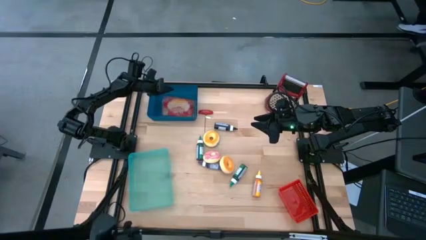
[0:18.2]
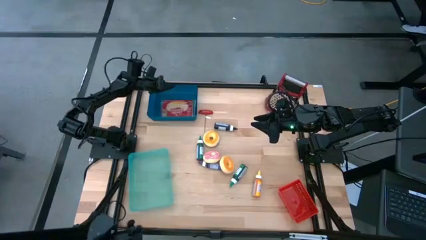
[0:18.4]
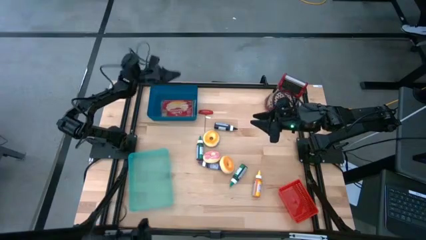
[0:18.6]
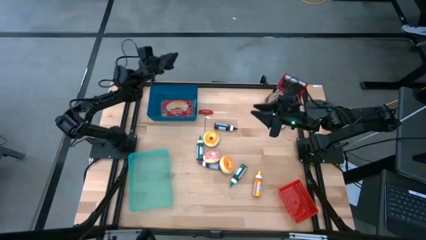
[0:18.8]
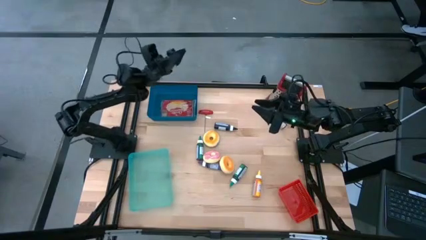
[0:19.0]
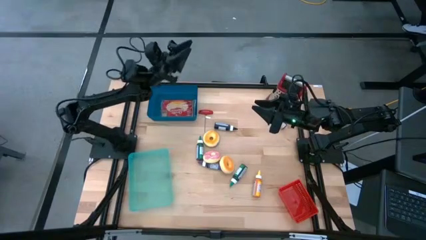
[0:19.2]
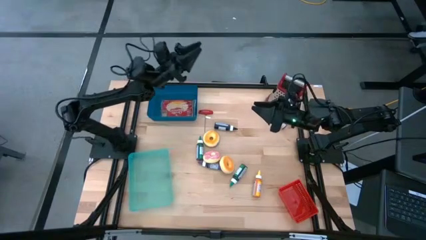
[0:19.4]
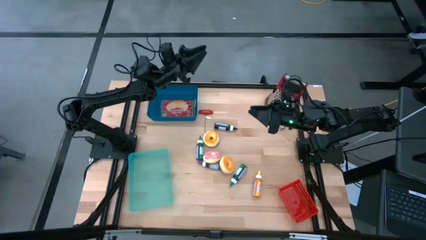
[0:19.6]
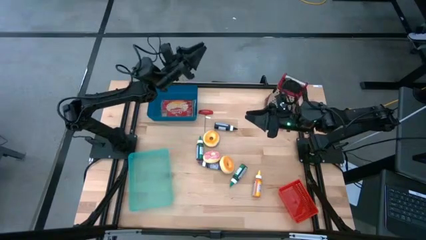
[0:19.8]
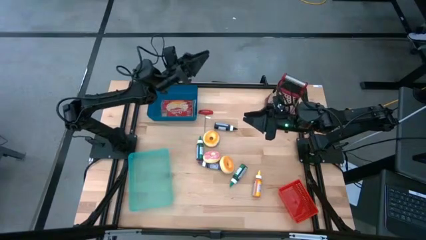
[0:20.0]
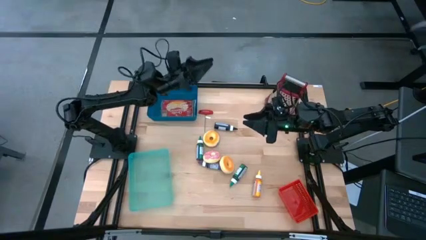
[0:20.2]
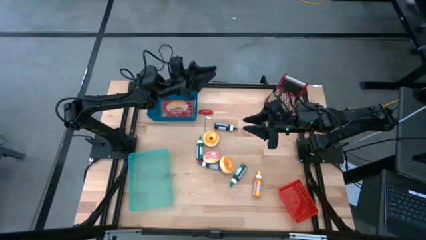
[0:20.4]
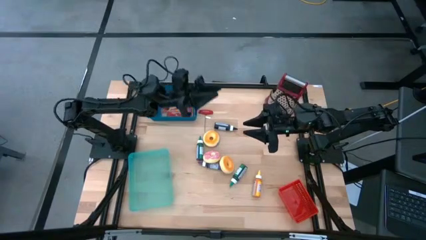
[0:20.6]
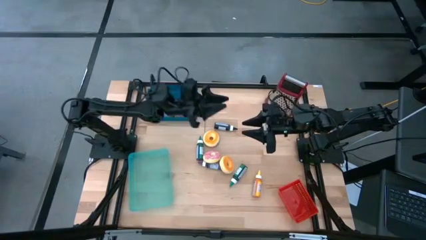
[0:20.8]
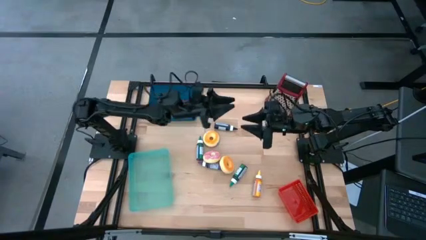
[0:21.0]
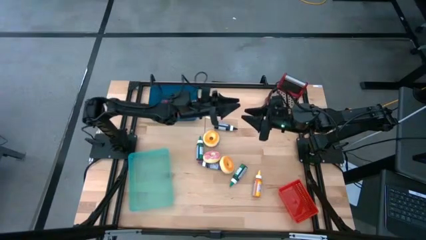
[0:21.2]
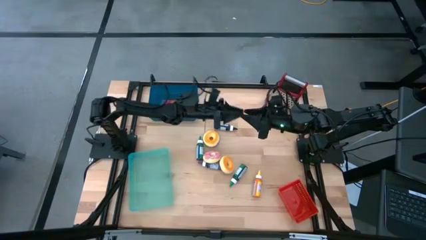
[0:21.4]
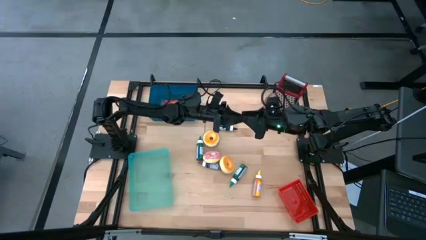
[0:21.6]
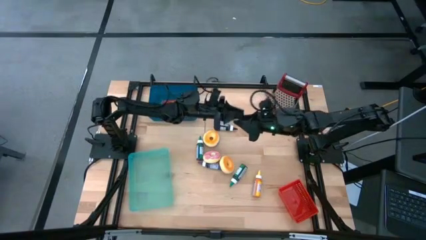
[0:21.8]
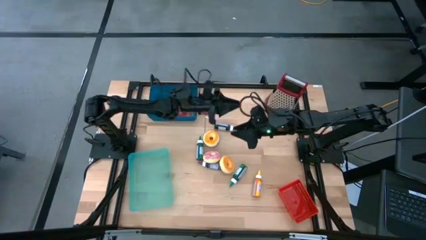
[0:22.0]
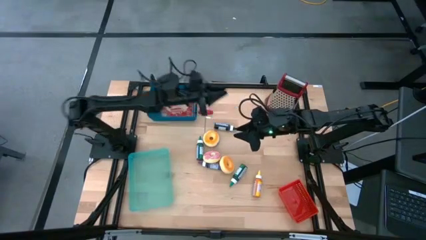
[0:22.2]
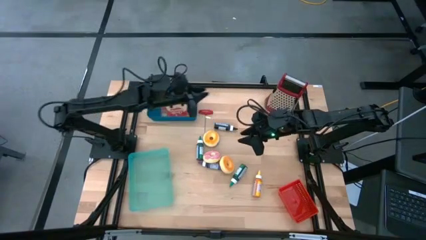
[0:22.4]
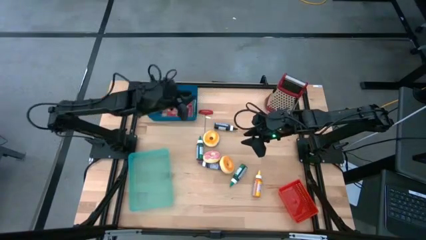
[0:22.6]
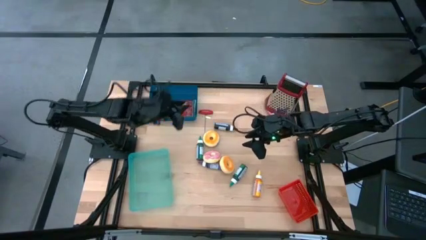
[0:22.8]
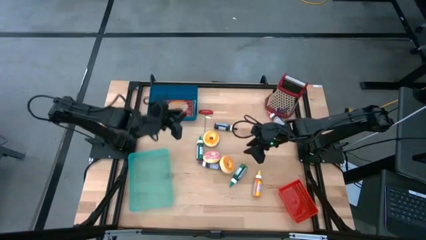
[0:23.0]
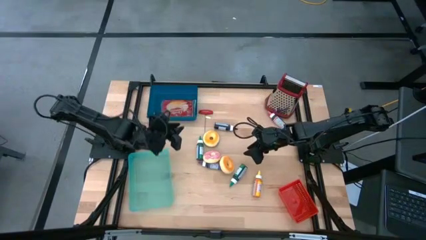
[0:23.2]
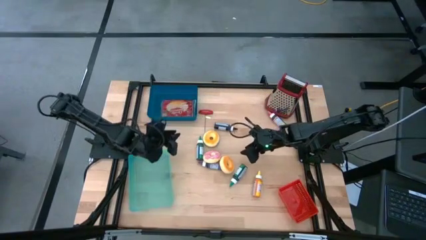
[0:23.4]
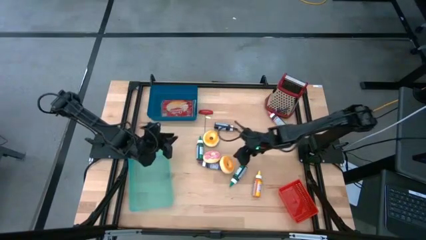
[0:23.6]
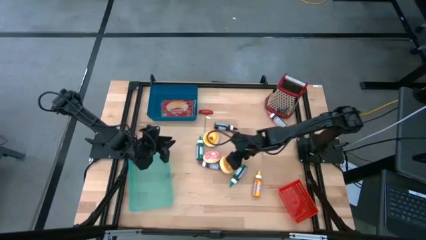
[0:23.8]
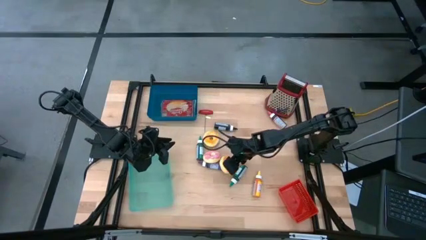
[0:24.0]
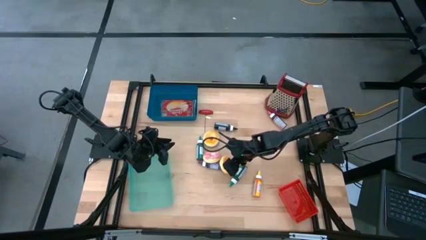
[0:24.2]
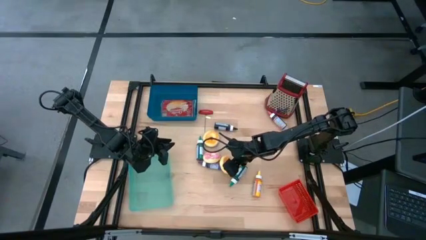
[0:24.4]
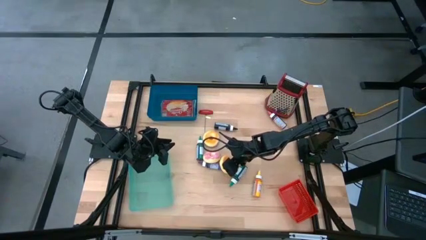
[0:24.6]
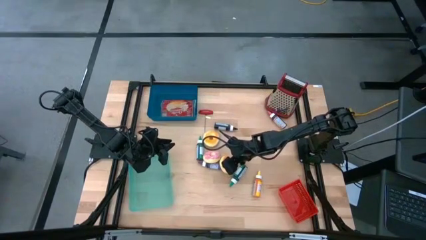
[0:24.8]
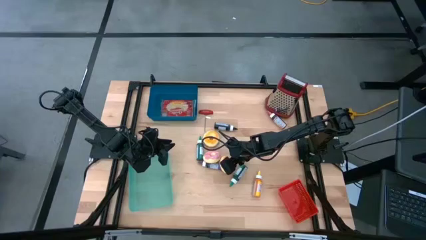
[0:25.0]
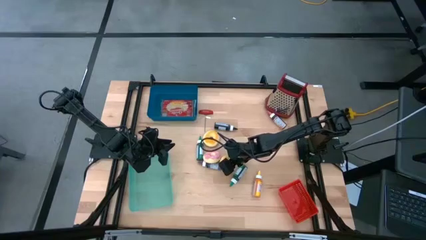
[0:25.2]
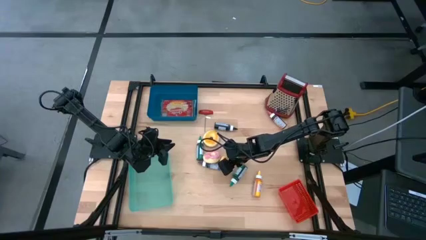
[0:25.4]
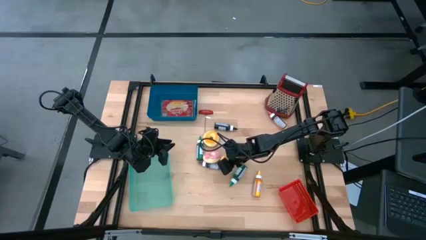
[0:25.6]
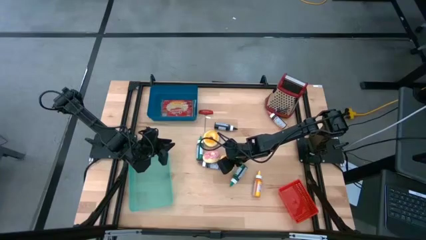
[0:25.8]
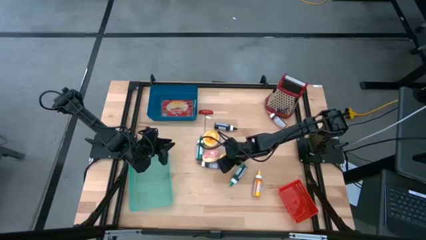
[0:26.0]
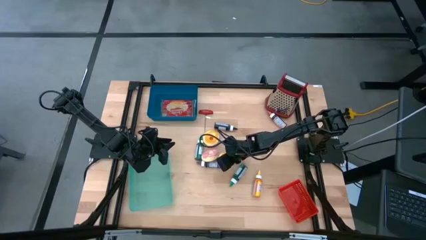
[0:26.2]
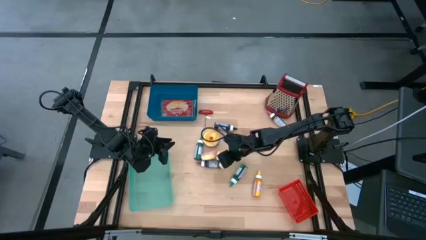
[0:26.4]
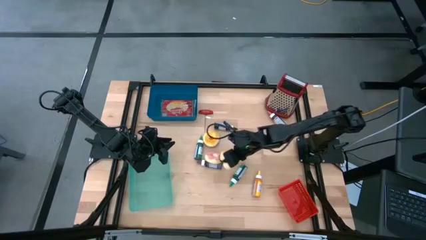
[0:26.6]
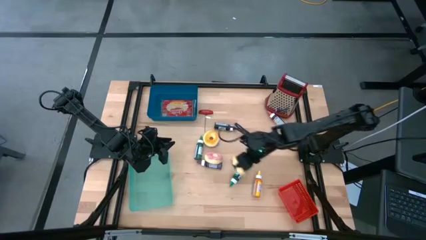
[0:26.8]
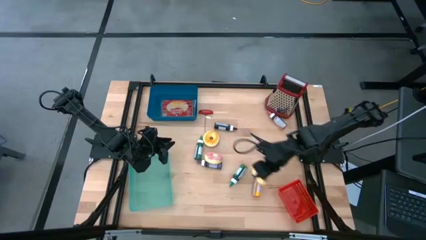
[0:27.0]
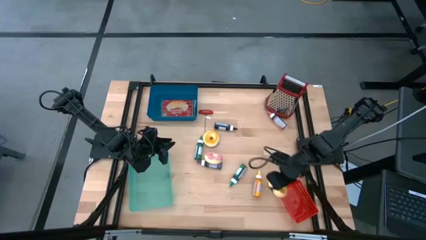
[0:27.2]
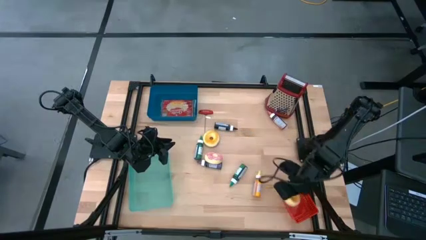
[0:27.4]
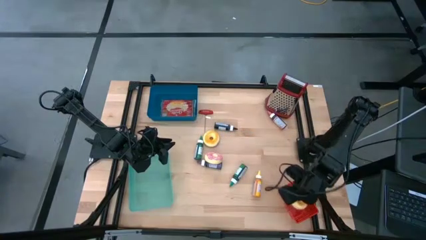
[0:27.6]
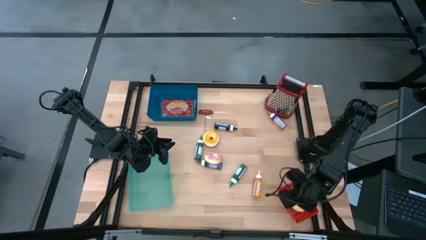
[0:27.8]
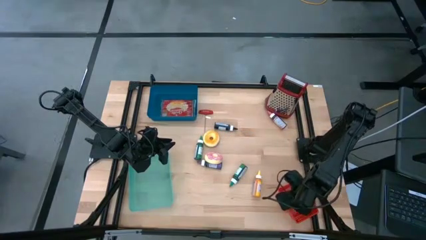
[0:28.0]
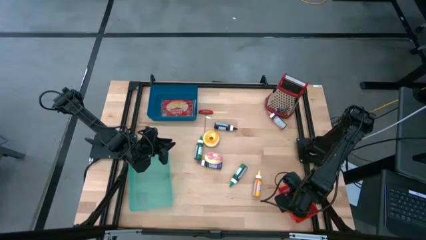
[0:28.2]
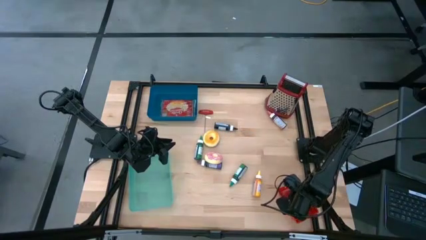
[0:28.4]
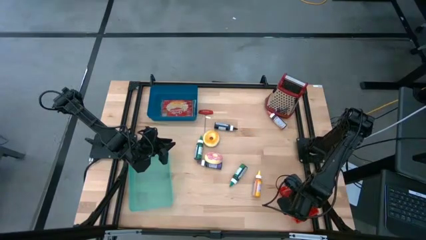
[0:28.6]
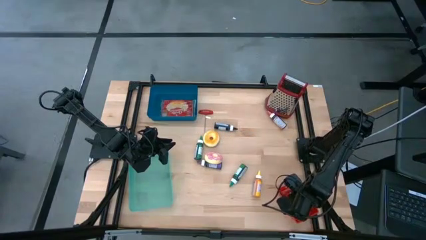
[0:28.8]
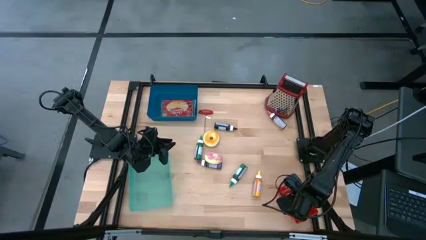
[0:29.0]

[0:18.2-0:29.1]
Put the black donut into the red bin

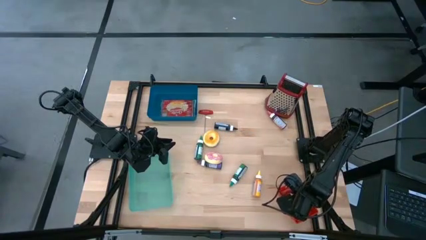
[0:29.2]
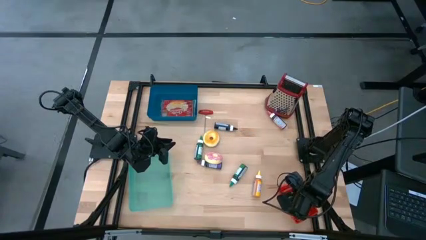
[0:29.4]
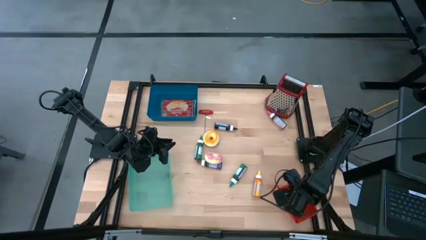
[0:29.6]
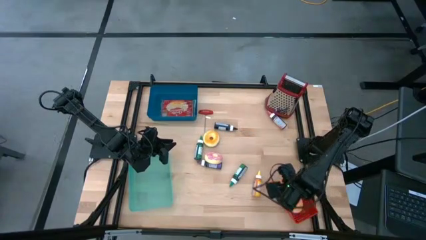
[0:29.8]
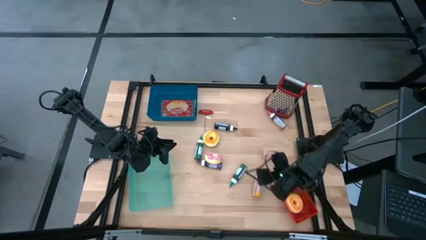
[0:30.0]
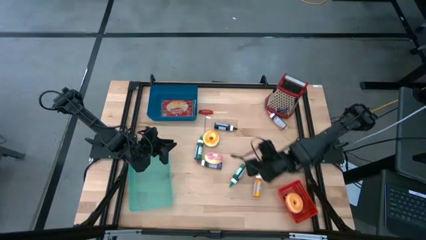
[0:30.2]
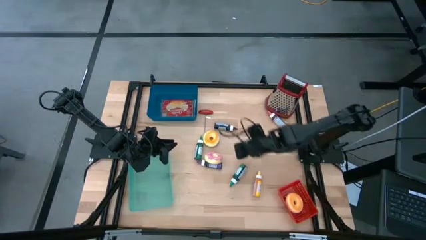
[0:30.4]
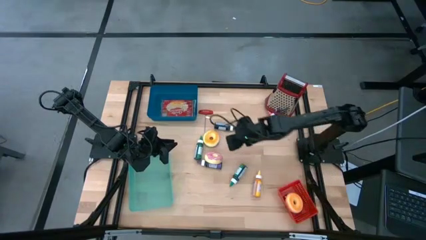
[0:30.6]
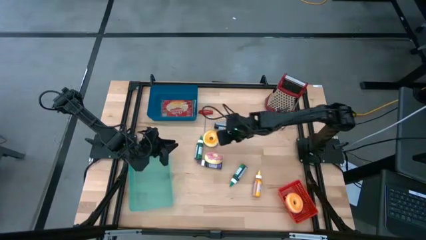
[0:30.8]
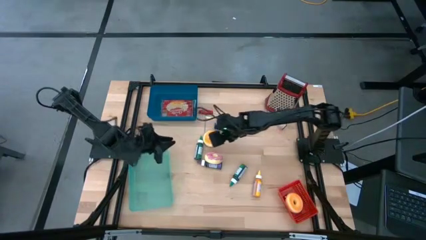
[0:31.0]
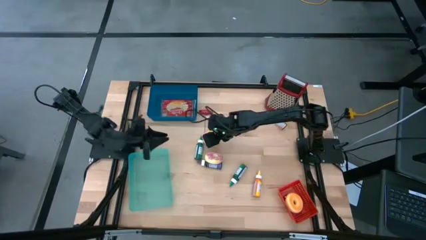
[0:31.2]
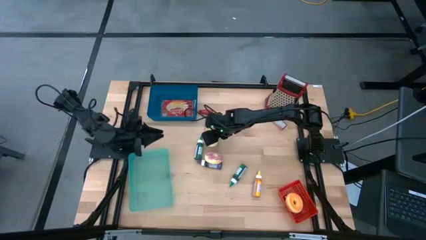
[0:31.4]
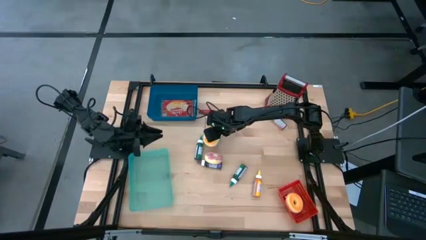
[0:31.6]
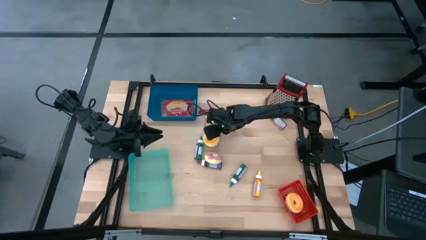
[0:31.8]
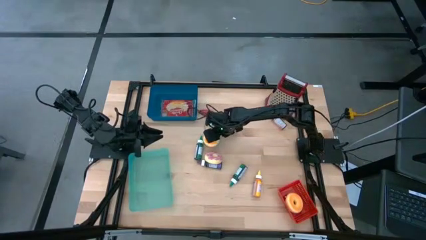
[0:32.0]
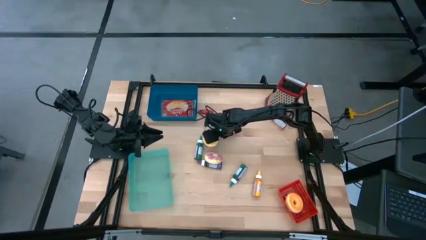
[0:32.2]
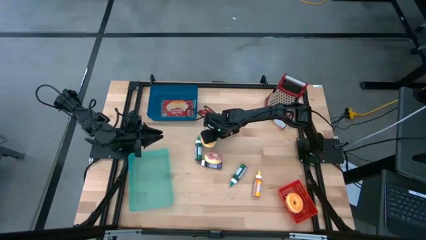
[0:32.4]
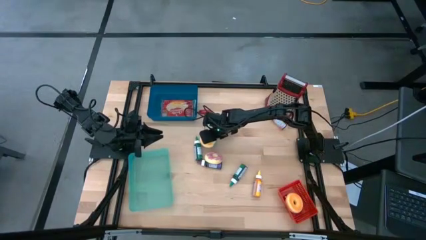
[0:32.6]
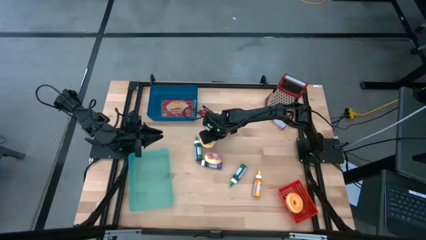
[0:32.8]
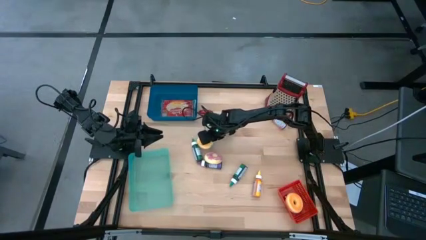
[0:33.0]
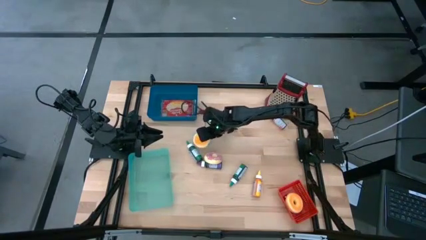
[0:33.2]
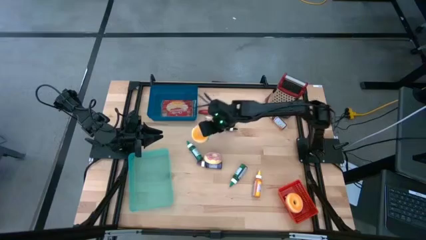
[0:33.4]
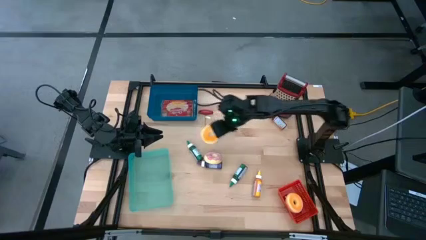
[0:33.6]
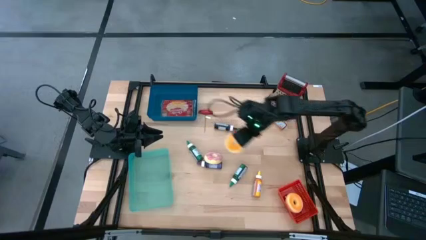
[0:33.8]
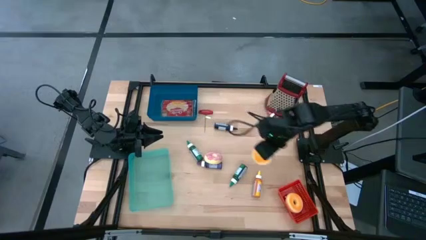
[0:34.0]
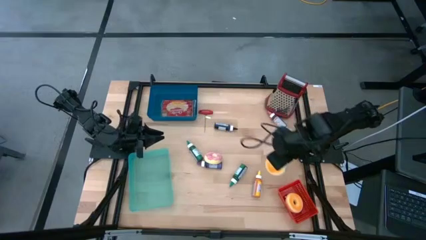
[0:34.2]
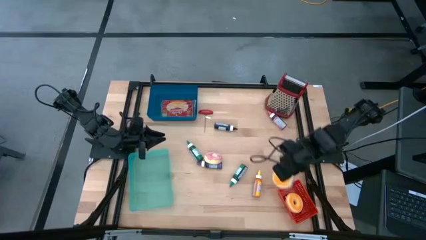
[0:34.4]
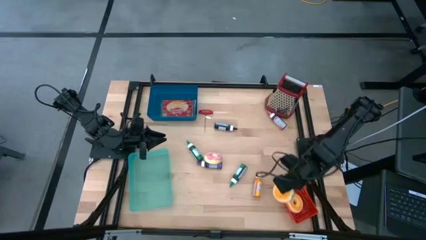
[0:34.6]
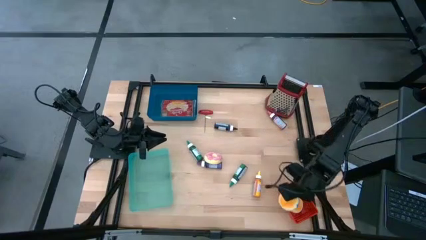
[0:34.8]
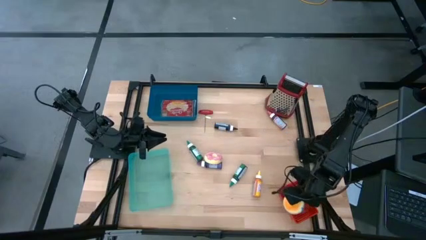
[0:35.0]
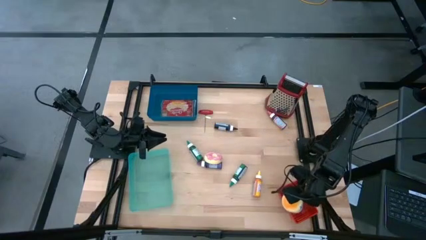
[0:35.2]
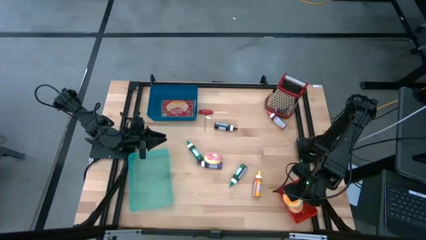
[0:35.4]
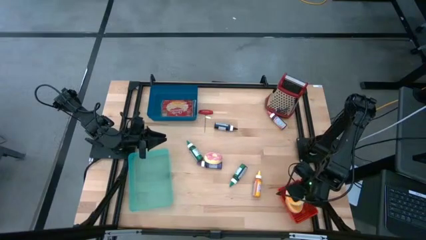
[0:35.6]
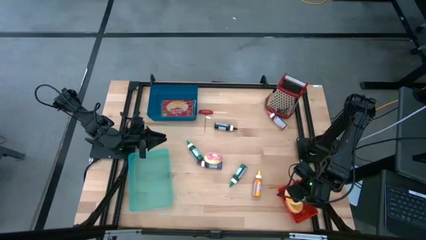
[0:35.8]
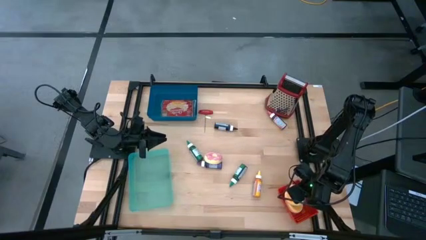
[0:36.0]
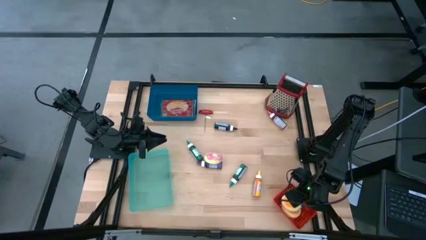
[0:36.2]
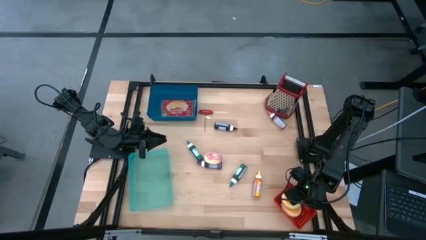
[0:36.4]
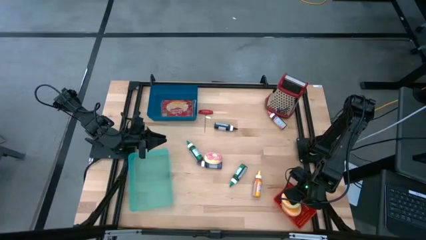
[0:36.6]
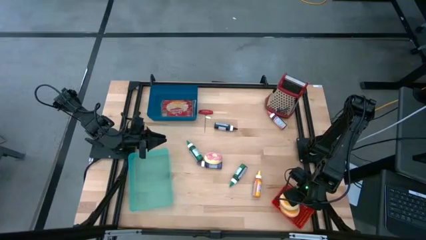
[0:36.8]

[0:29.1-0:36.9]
Put the blue donut into the red bin
